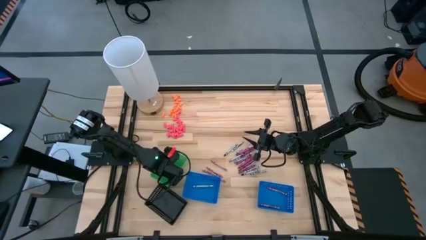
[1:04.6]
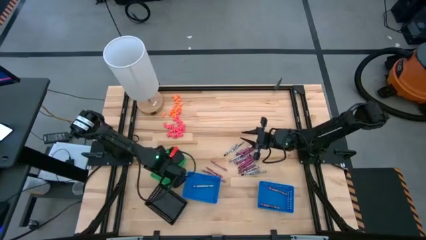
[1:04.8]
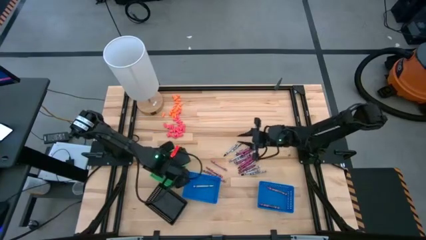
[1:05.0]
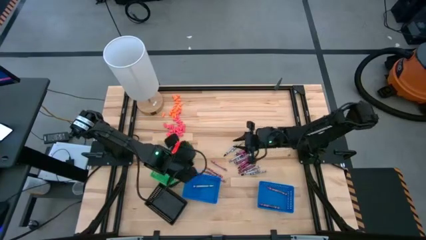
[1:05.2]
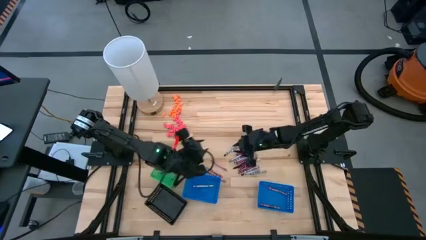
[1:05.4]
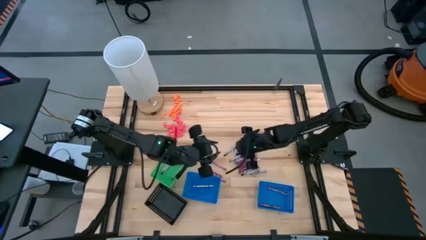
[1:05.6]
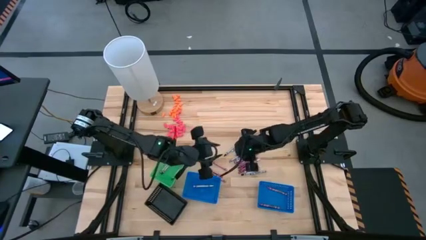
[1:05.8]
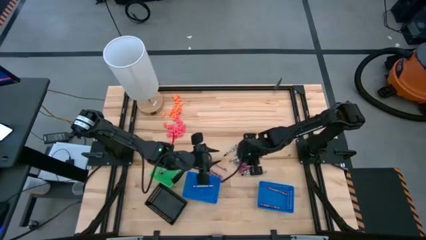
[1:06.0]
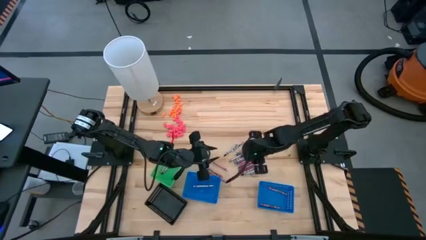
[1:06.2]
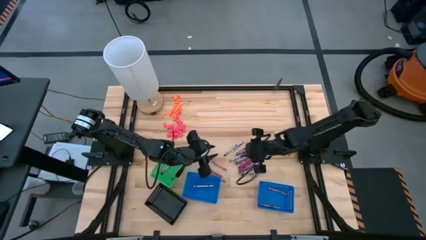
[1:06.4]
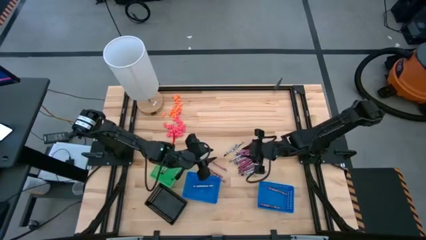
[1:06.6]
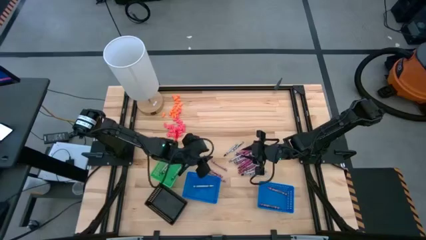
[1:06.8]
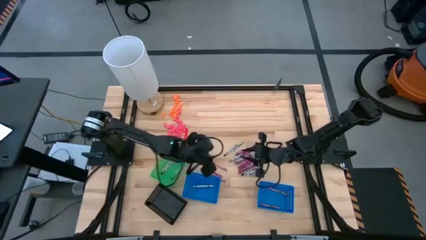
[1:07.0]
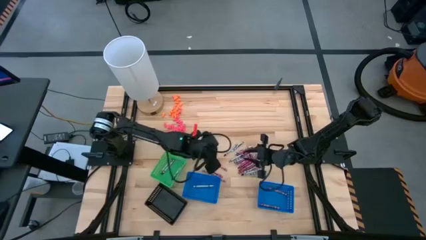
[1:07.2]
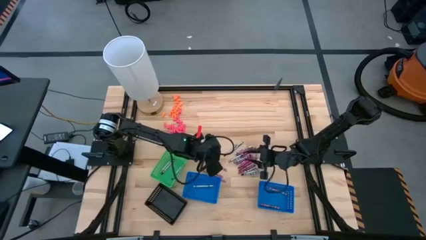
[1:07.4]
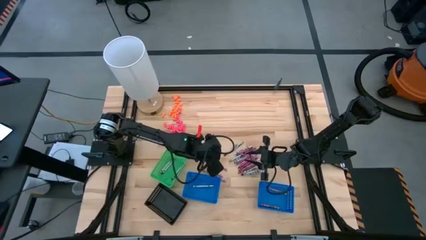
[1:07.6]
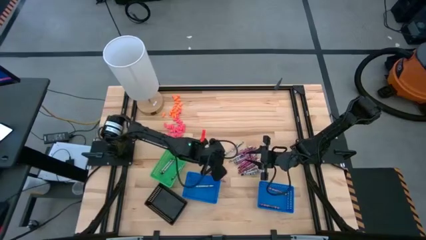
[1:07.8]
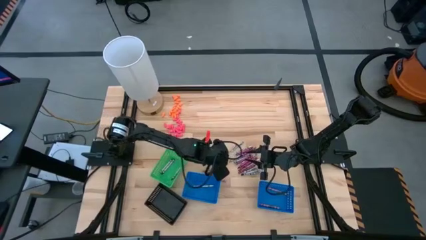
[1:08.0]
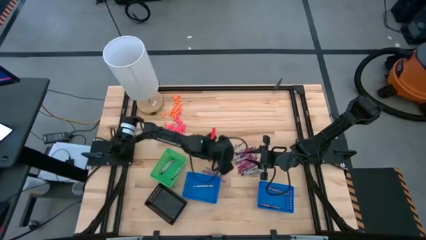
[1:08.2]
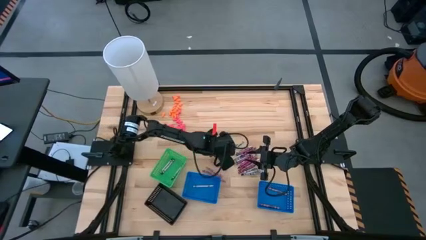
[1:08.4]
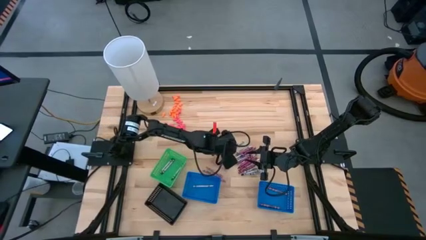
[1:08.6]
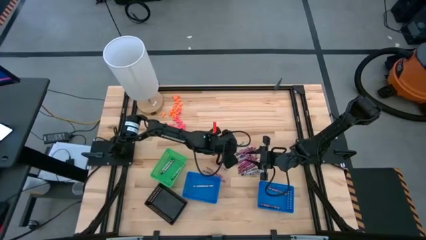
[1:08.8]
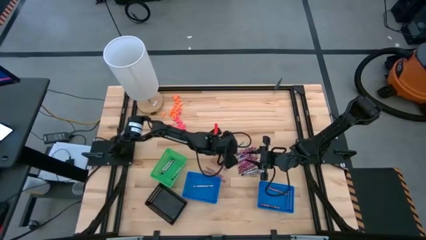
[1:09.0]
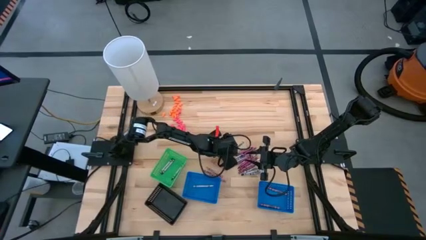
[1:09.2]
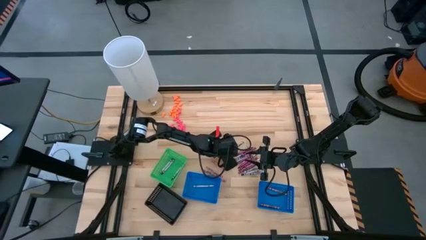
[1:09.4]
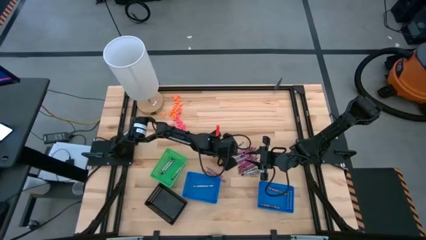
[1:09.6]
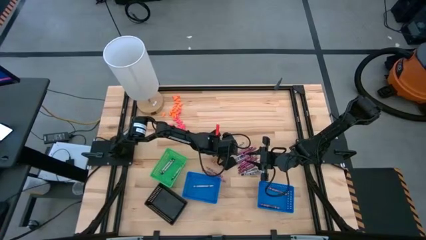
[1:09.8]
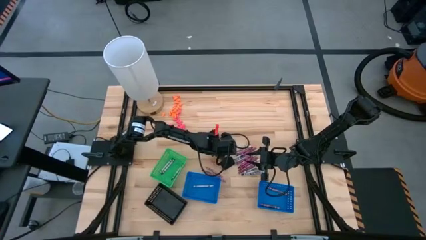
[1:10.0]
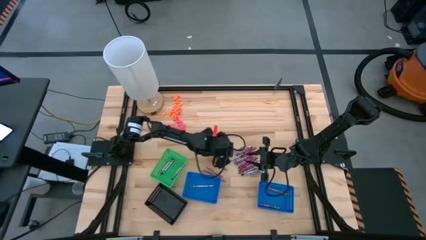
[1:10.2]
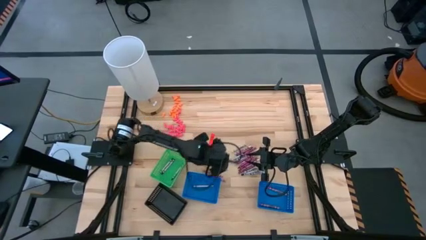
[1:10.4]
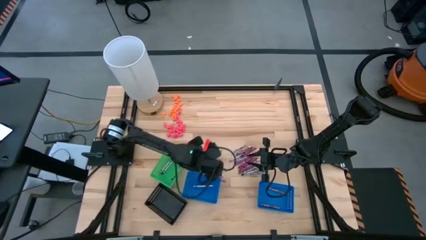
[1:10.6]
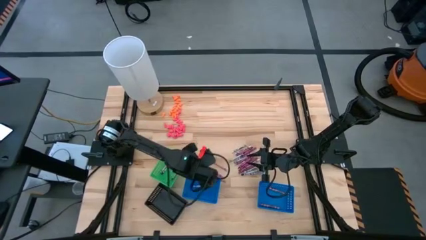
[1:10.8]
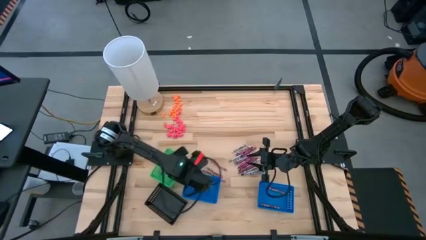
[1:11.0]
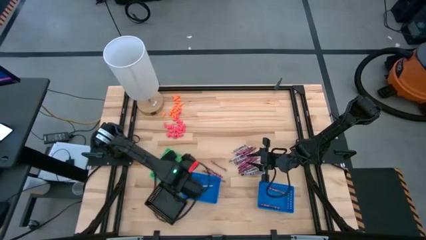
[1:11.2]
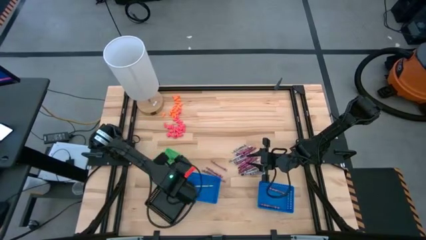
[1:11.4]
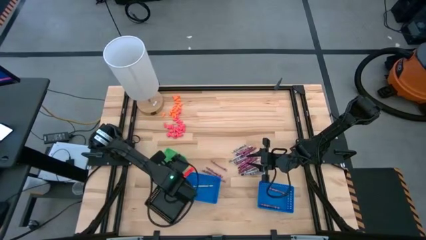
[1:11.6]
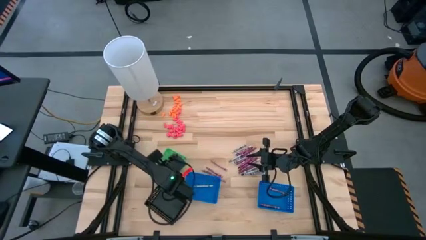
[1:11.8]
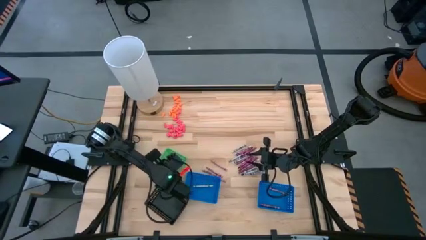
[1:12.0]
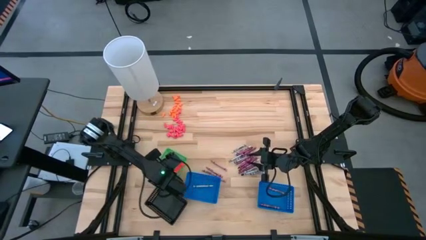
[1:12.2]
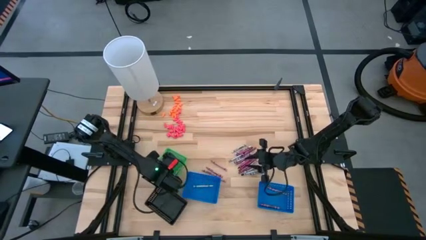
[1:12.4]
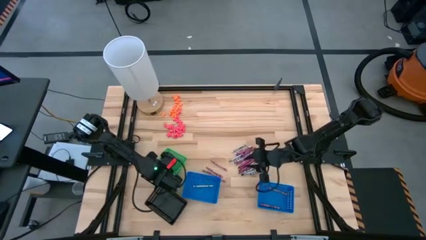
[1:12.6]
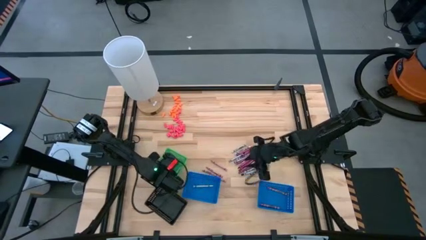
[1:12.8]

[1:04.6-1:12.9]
Task: Sort crayons
Put the black crayon into the green basket

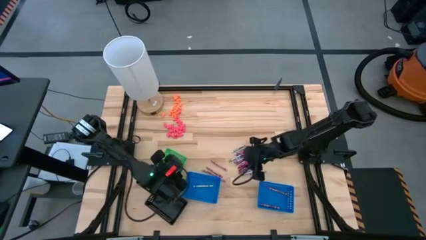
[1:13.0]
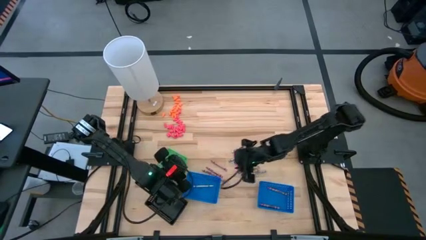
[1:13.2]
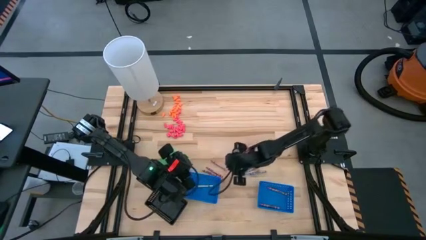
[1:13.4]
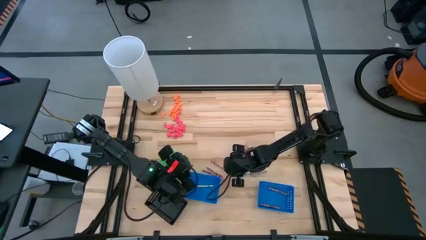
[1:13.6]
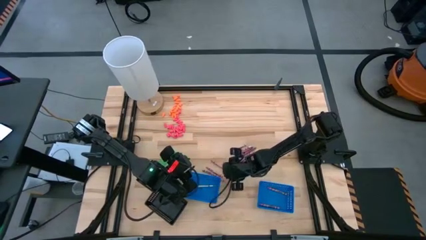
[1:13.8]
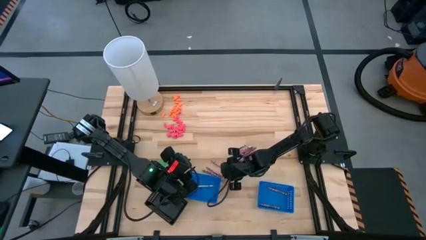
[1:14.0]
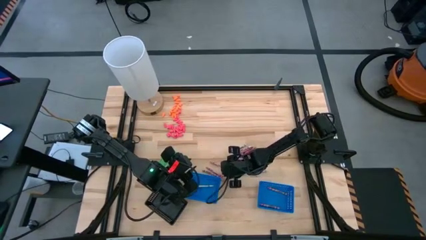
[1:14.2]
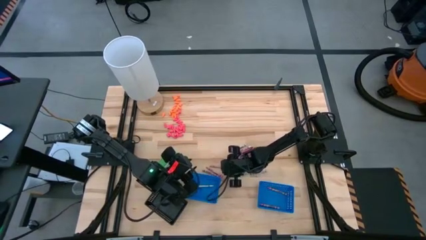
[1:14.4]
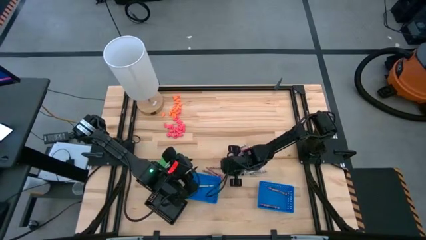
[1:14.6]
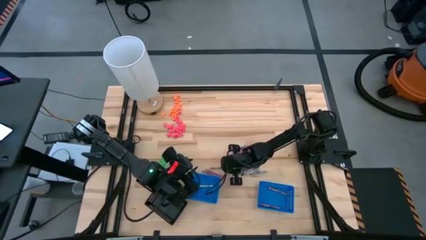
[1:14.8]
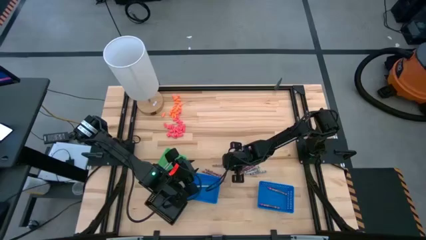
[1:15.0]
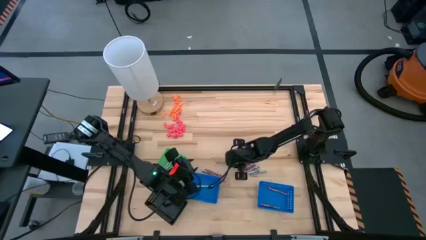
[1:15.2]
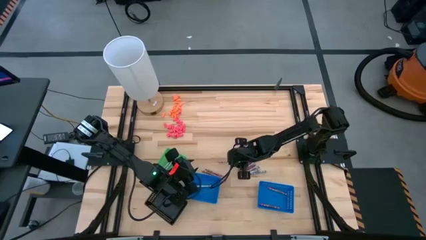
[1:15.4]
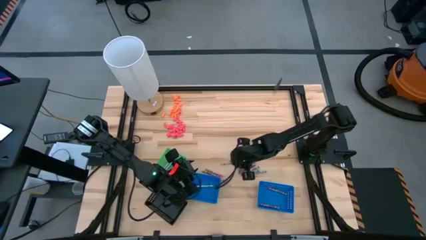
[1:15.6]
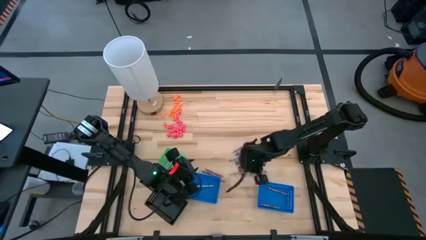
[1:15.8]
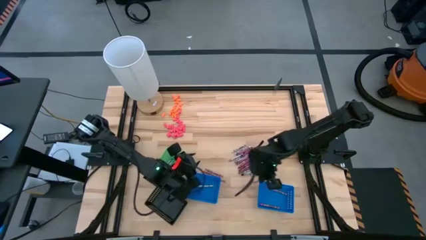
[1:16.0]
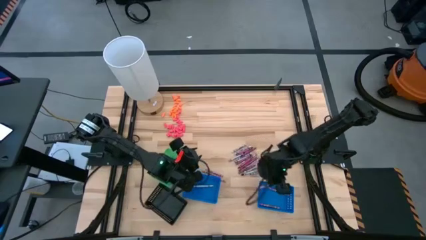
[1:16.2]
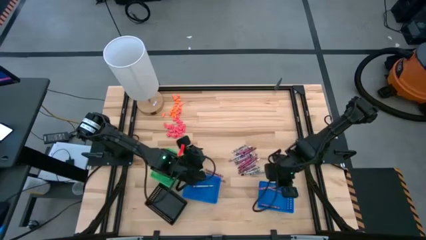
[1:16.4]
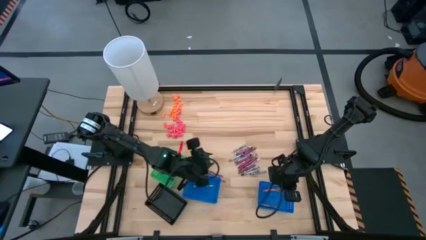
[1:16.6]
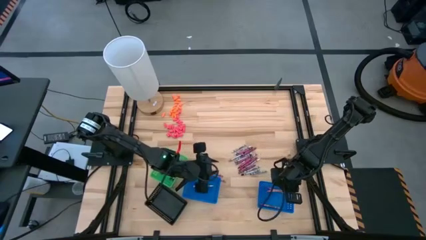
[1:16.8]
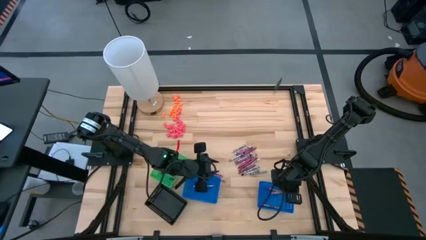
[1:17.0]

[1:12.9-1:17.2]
Put the pink crayon into the right blue basket
